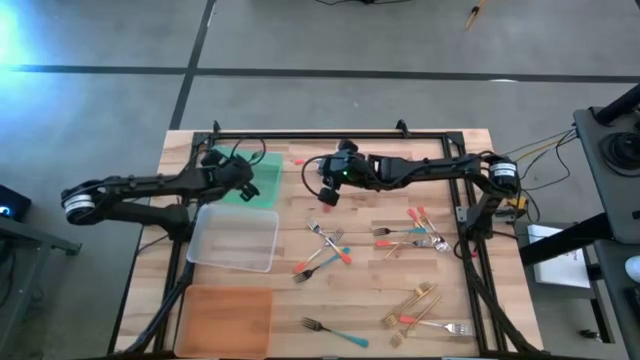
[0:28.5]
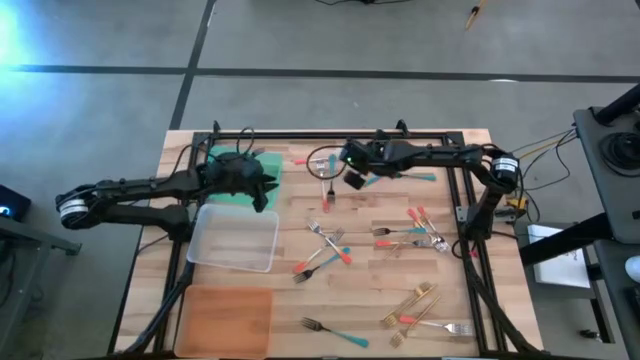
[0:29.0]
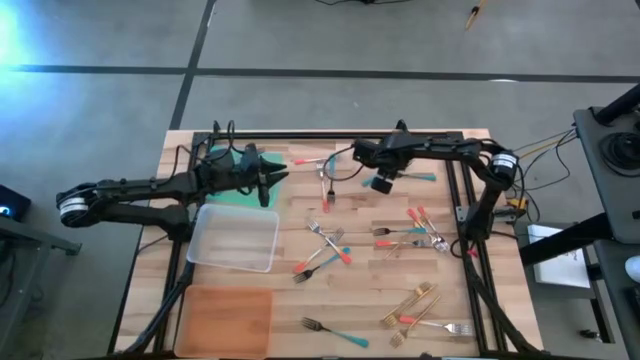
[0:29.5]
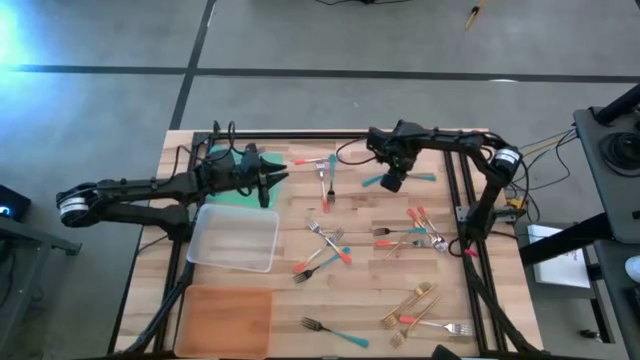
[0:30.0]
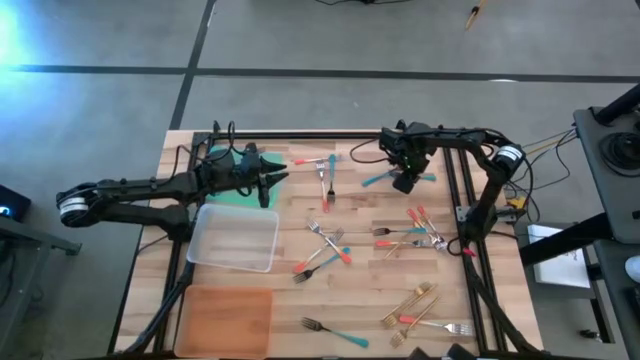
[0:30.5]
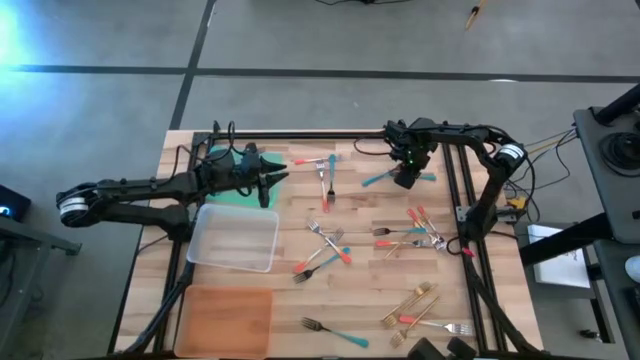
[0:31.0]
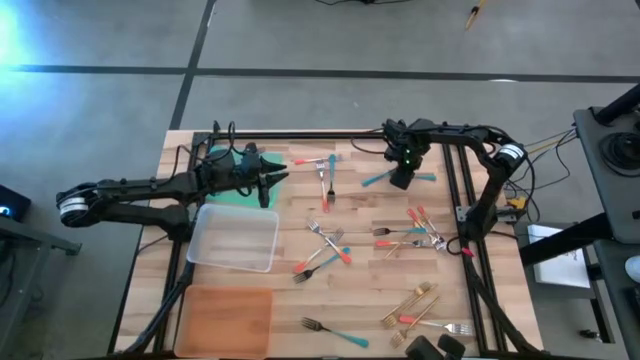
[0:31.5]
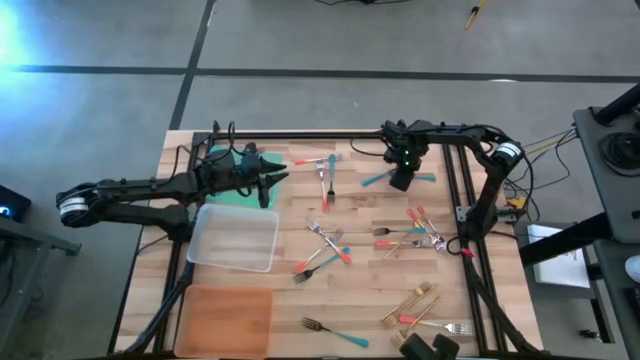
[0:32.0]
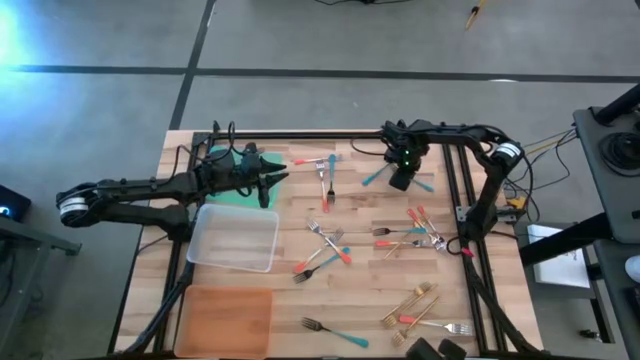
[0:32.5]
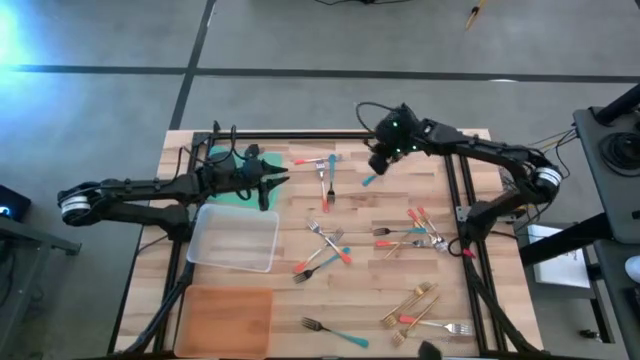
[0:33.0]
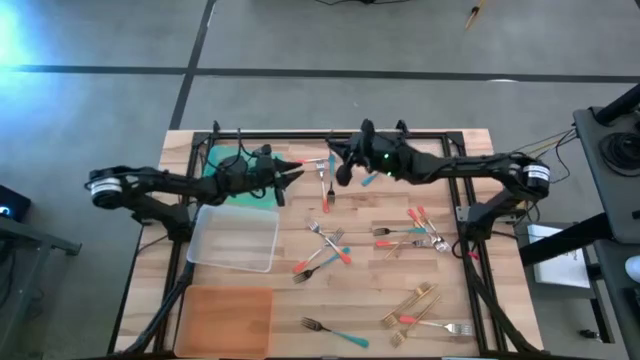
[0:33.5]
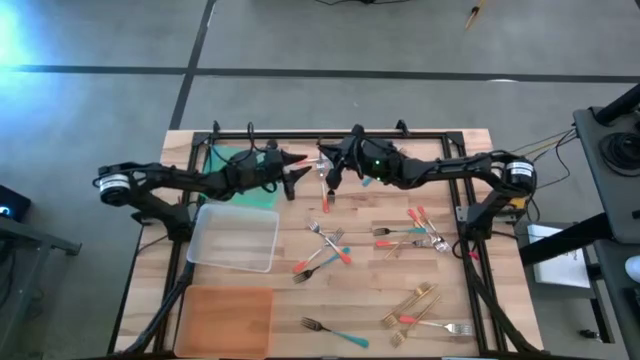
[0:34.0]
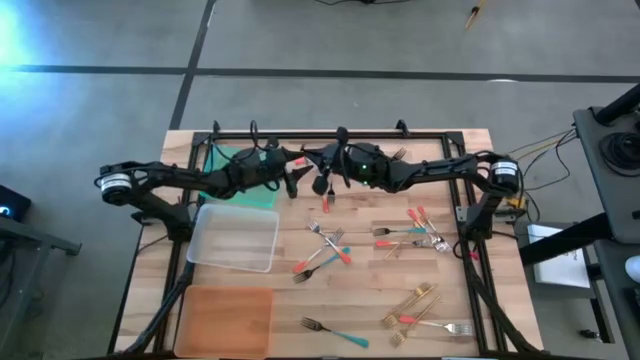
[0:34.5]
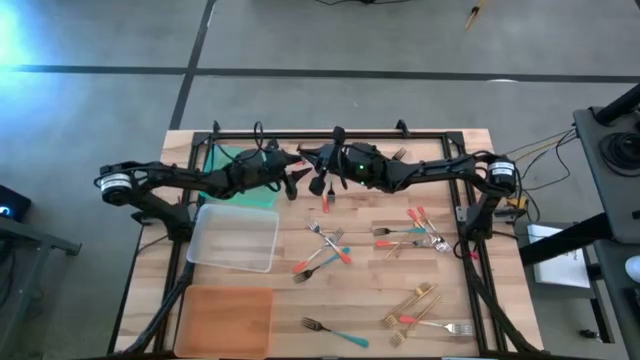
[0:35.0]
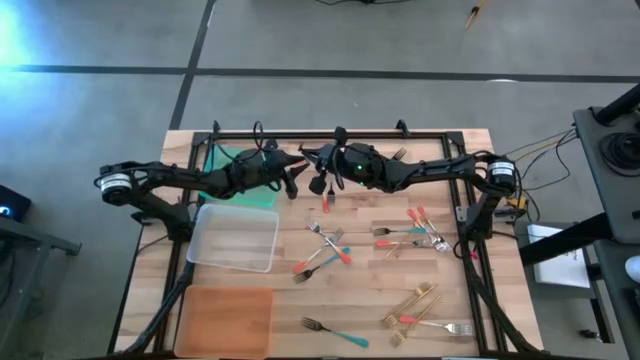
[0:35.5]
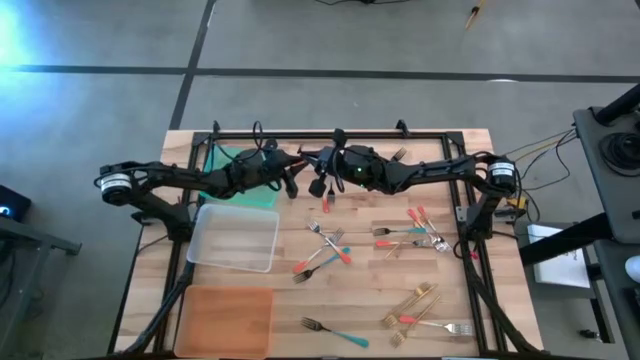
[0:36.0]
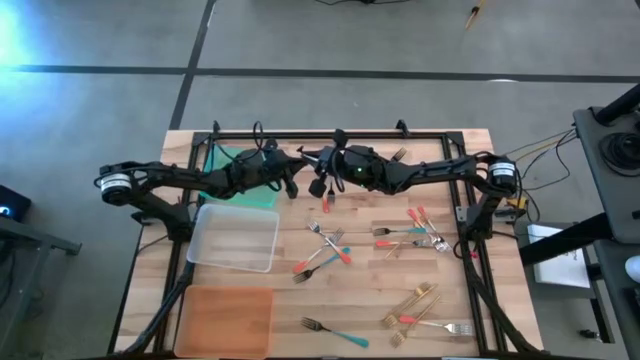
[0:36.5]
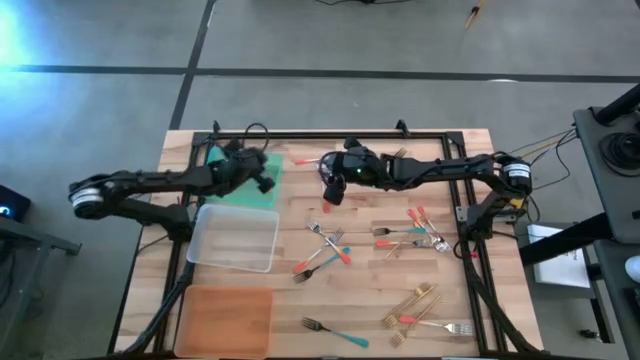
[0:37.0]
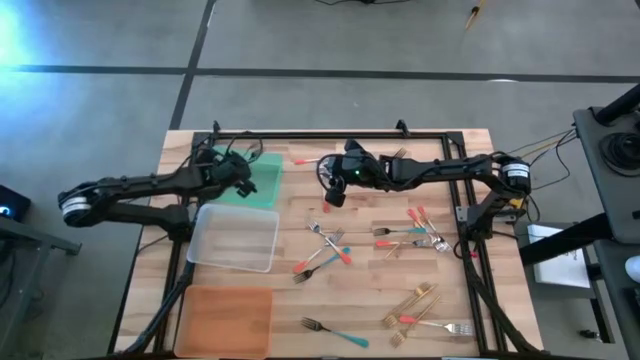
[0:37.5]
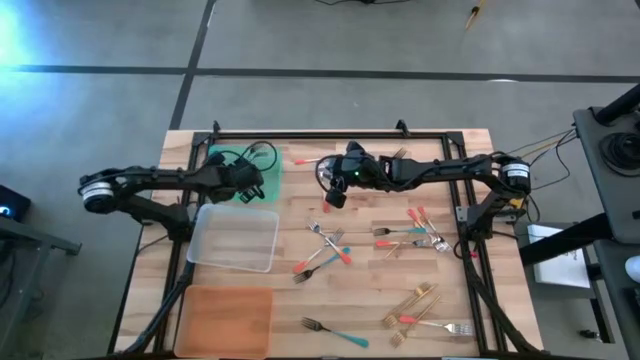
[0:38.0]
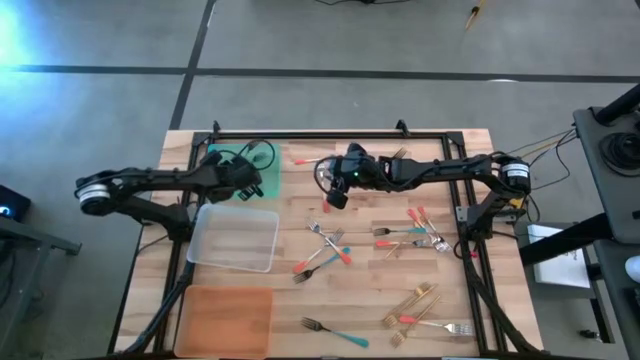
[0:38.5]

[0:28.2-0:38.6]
Task: Sort silverware by color (type)
Put the blue fork into the blue bin

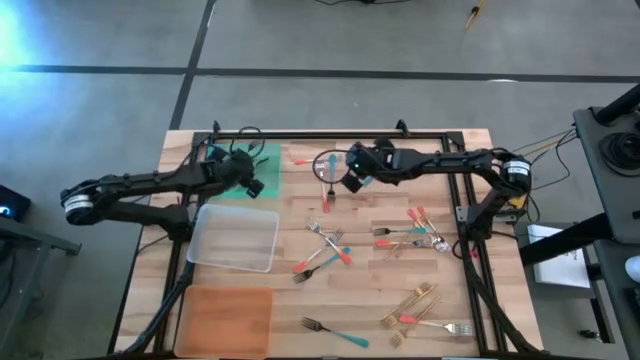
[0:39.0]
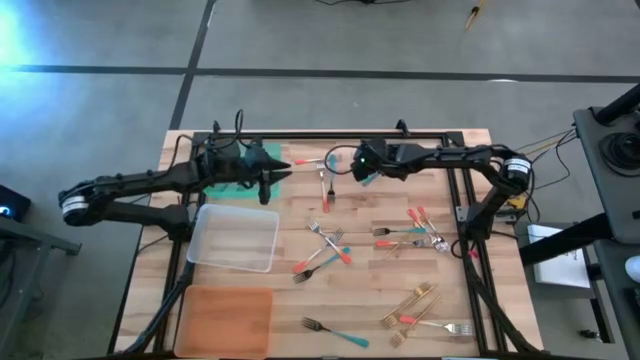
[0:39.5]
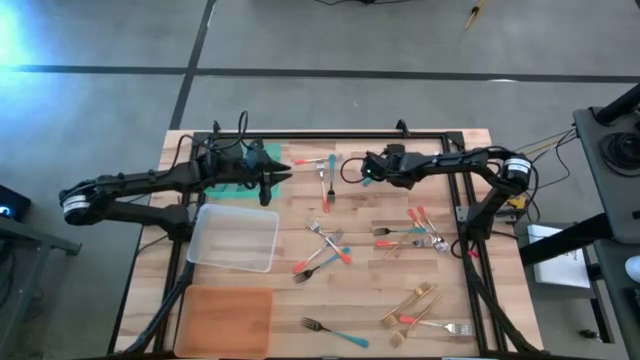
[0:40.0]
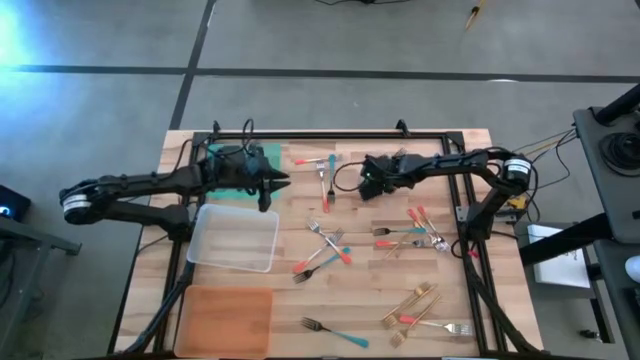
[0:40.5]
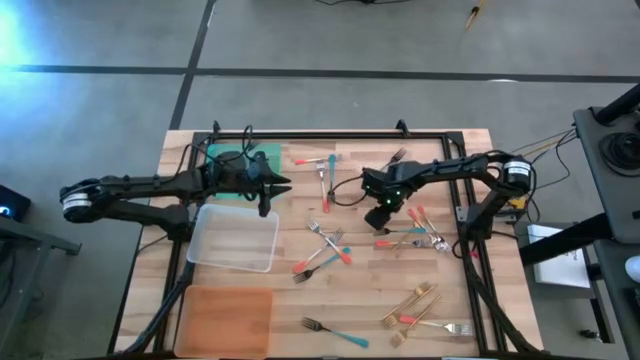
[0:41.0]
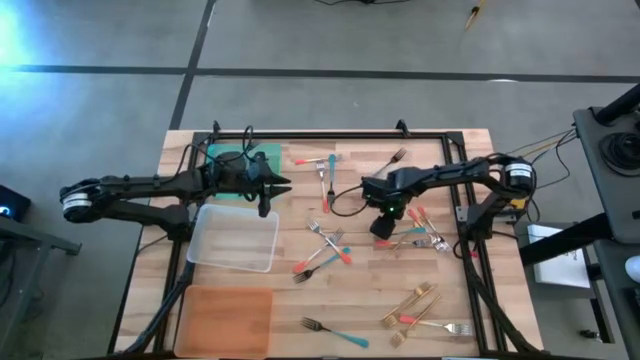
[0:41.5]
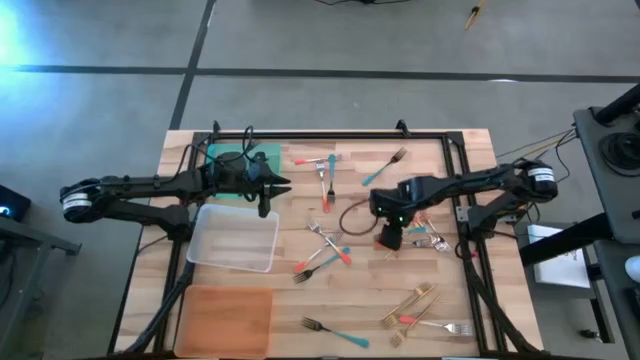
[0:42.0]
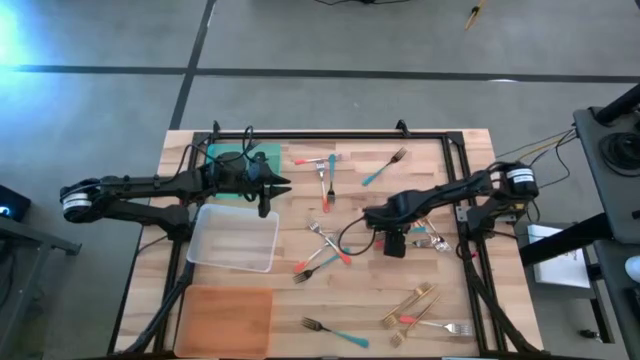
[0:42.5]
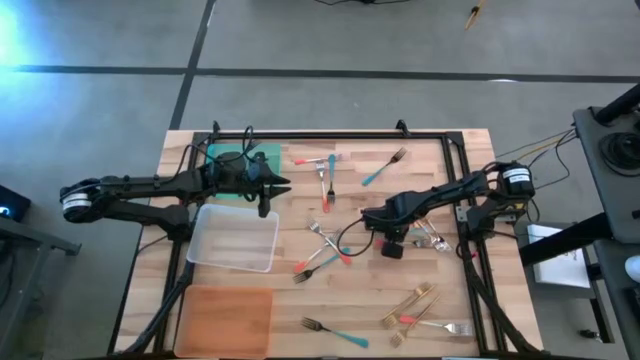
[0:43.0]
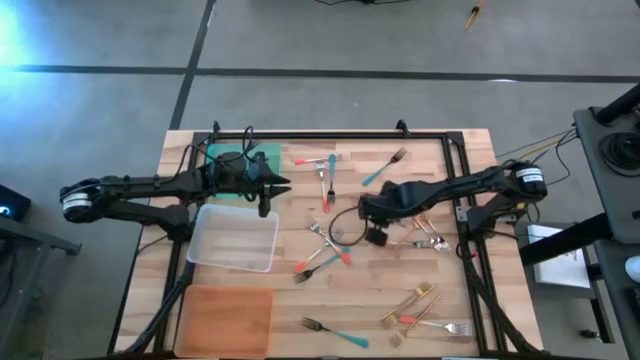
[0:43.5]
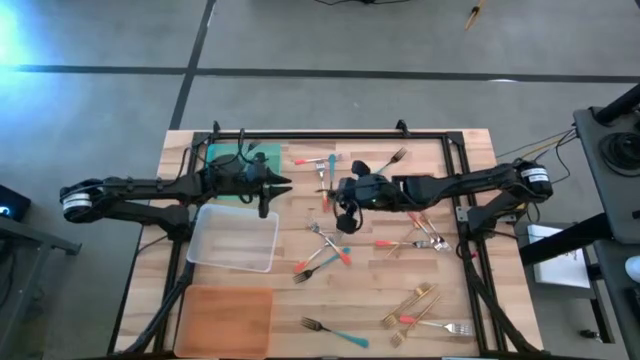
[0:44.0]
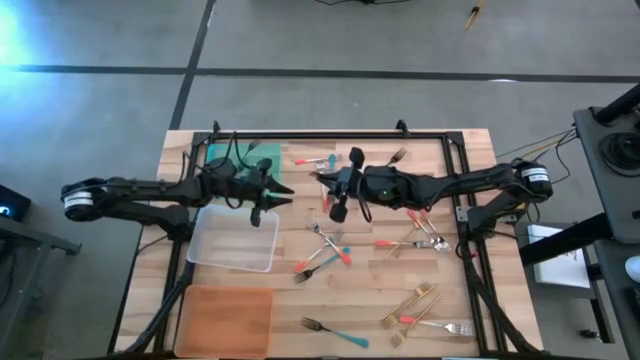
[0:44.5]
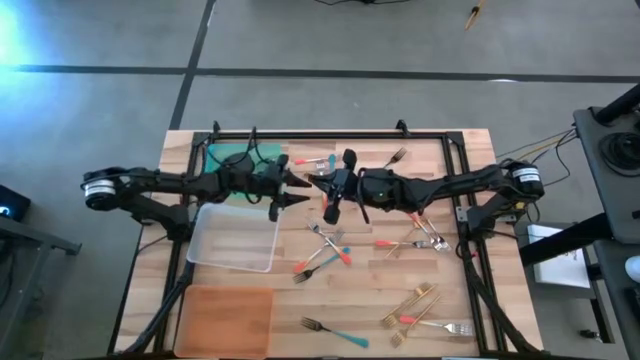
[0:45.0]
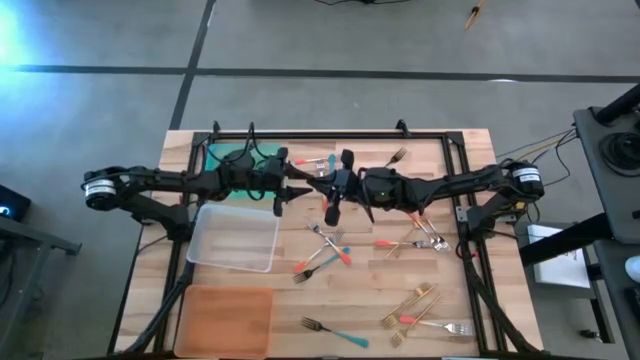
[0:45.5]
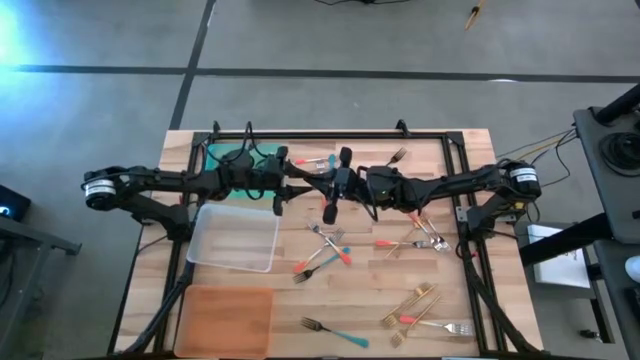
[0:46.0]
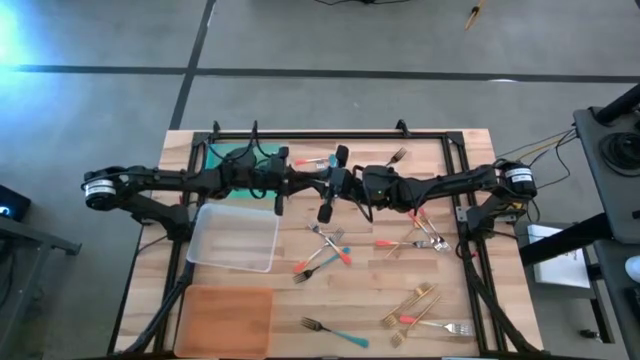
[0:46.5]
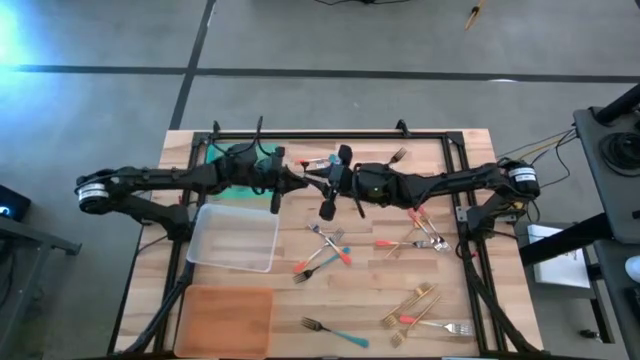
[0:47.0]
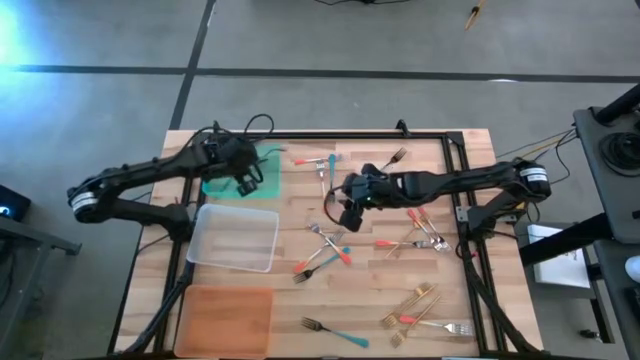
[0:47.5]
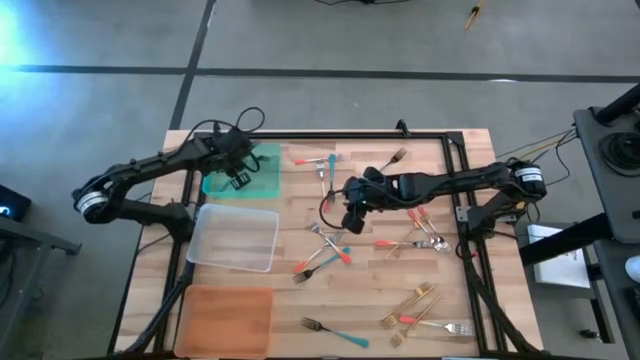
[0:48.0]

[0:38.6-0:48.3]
Put the blue fork into the blue bin

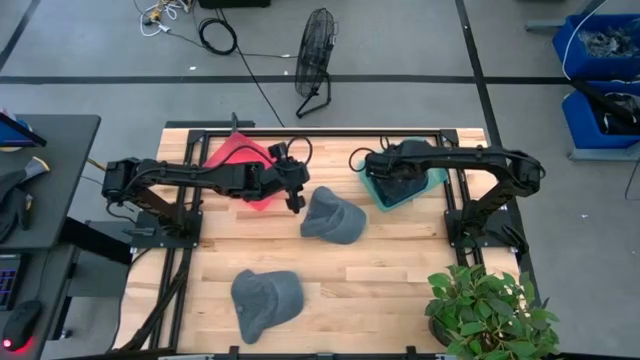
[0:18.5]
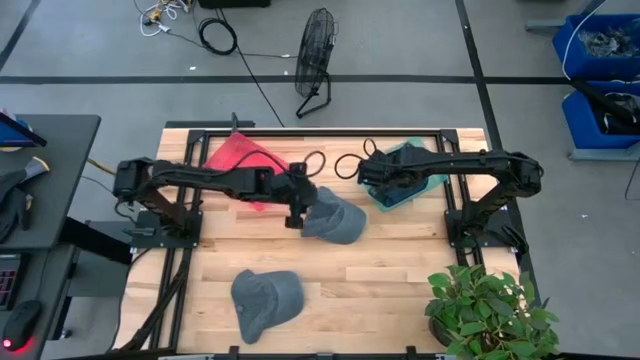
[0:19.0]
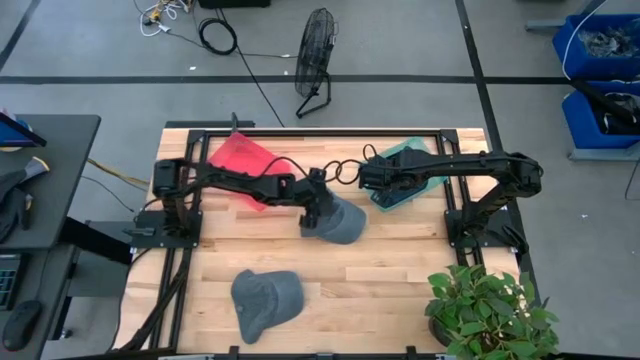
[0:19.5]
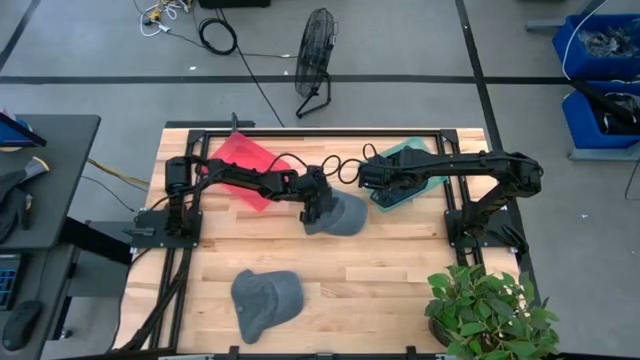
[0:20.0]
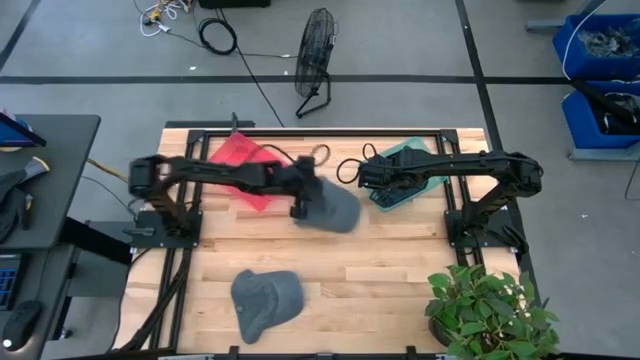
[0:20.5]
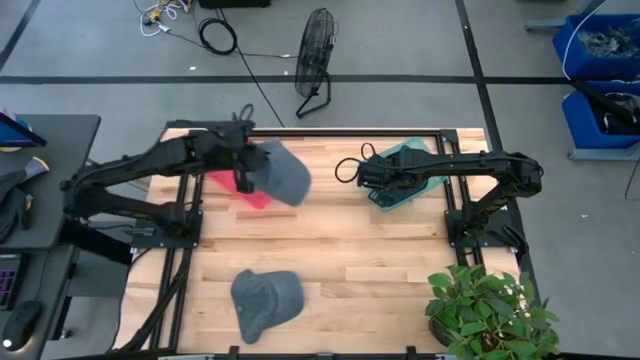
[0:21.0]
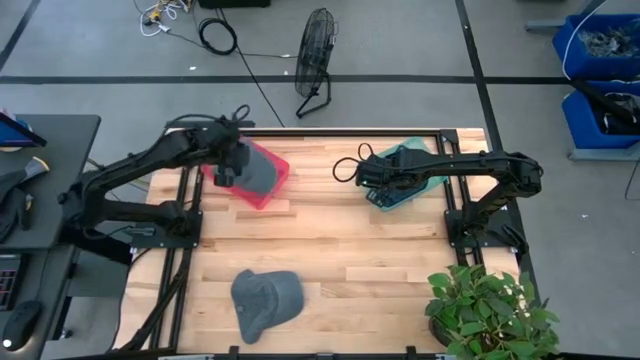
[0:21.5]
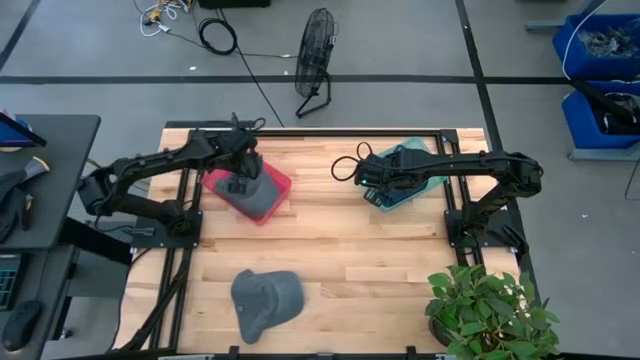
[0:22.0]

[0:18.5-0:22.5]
Task: Pick & Place hat
Put the top gray cap into the red bin
